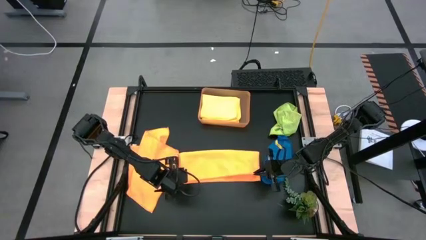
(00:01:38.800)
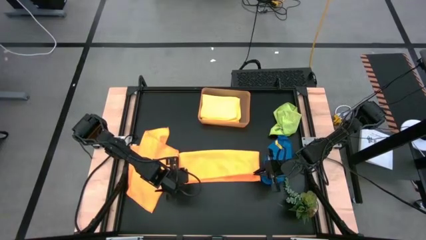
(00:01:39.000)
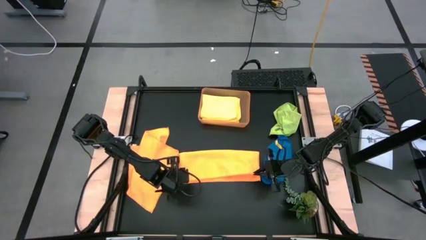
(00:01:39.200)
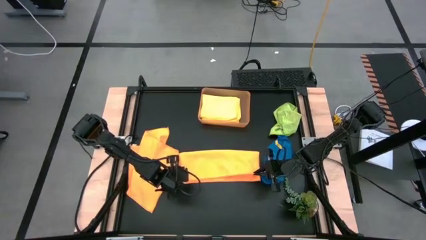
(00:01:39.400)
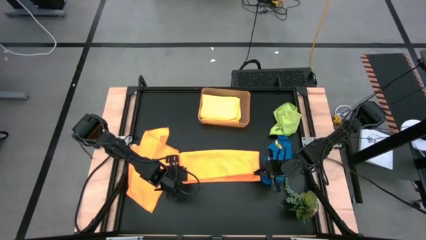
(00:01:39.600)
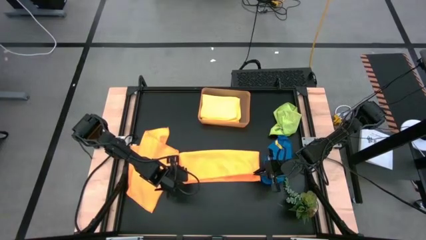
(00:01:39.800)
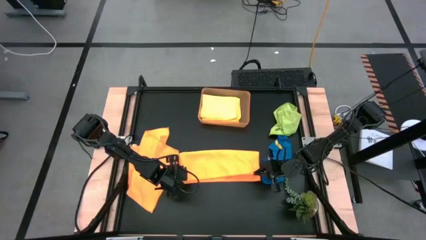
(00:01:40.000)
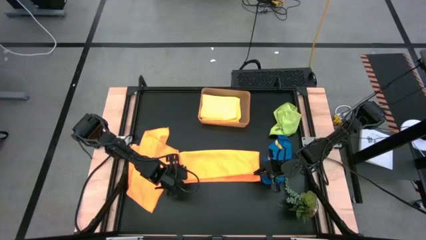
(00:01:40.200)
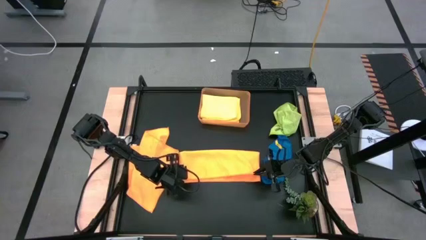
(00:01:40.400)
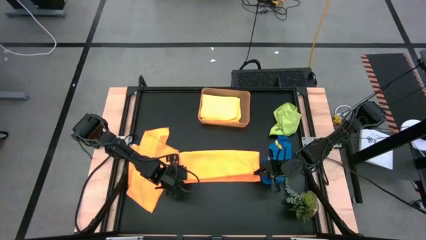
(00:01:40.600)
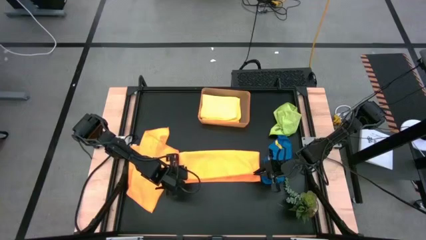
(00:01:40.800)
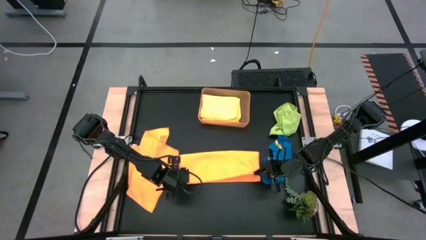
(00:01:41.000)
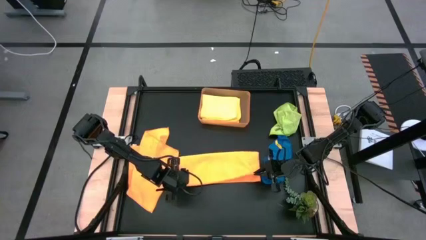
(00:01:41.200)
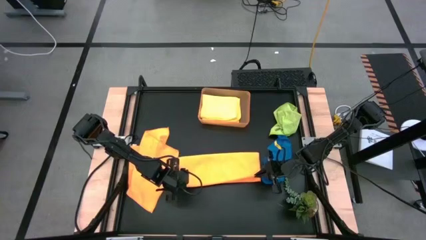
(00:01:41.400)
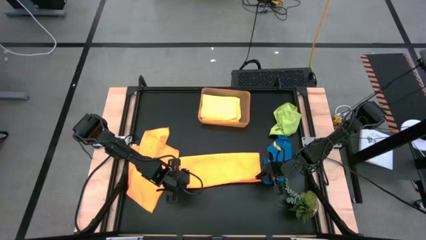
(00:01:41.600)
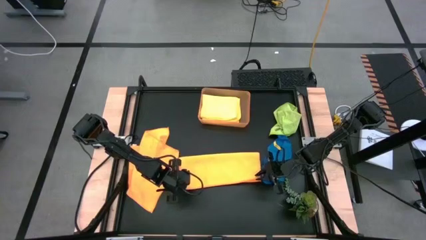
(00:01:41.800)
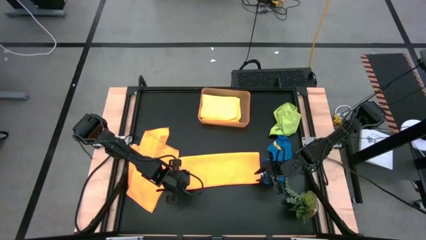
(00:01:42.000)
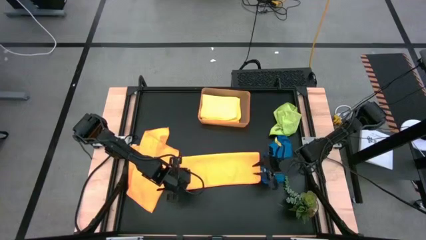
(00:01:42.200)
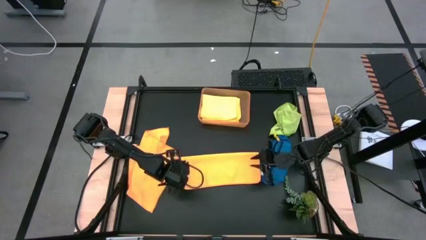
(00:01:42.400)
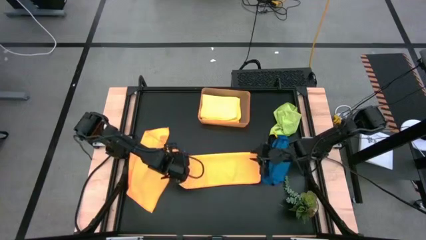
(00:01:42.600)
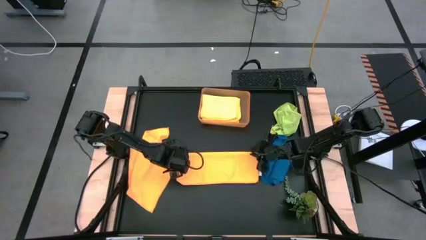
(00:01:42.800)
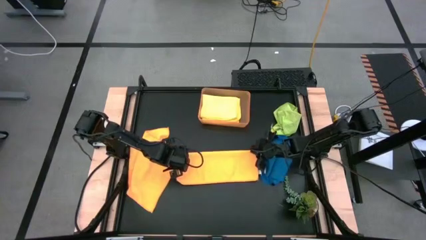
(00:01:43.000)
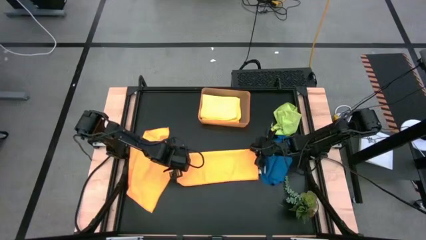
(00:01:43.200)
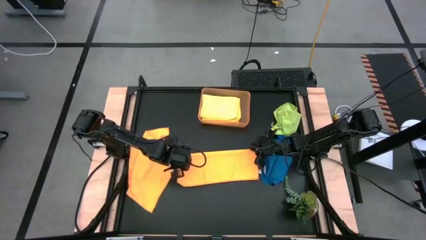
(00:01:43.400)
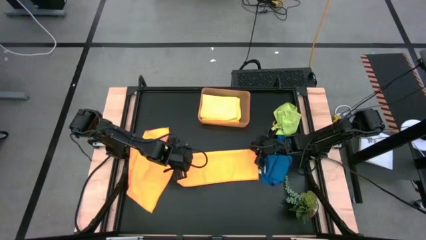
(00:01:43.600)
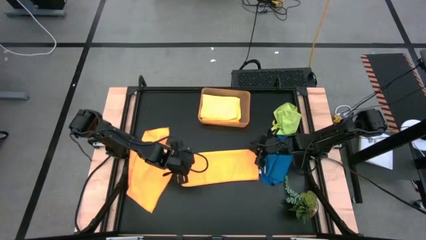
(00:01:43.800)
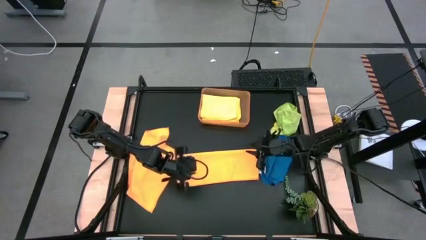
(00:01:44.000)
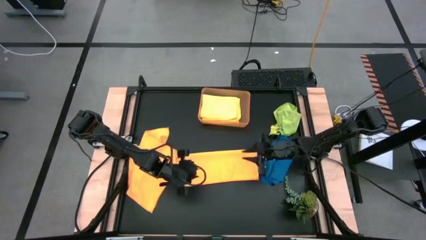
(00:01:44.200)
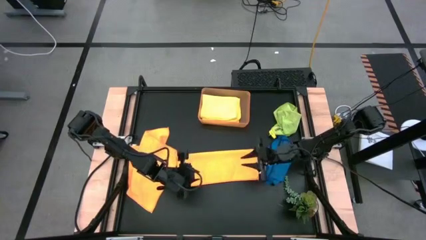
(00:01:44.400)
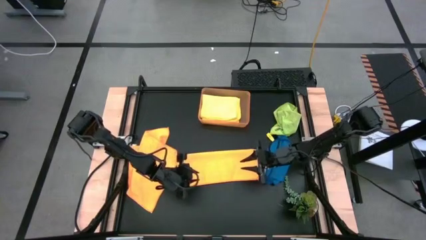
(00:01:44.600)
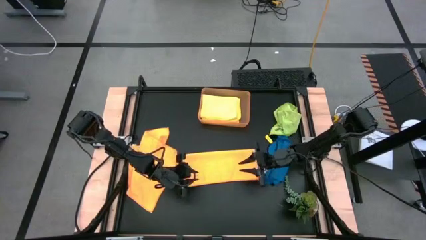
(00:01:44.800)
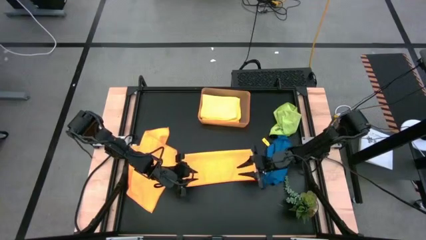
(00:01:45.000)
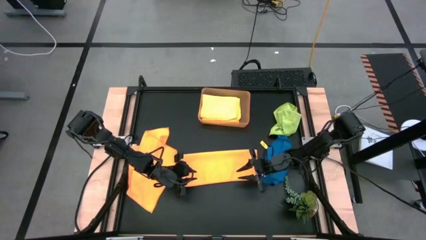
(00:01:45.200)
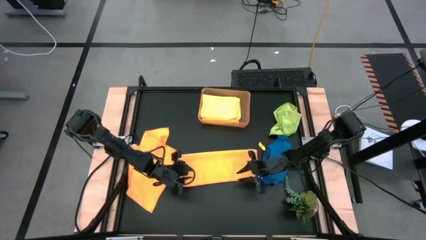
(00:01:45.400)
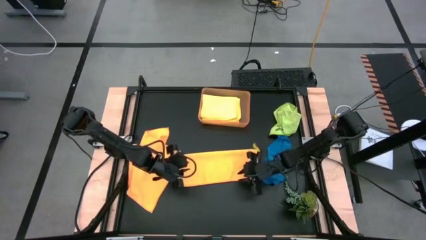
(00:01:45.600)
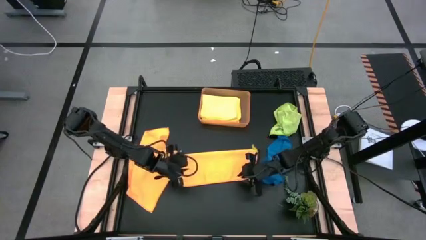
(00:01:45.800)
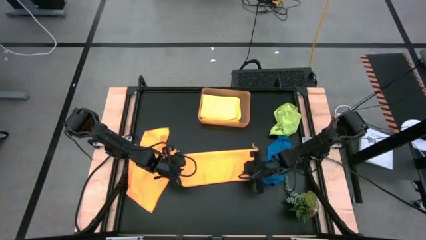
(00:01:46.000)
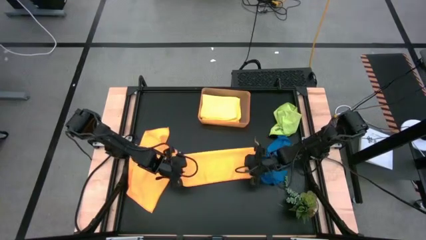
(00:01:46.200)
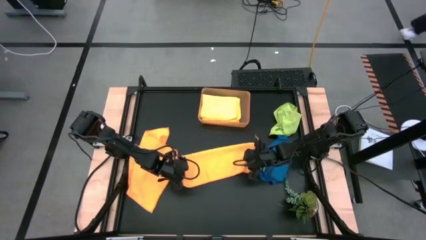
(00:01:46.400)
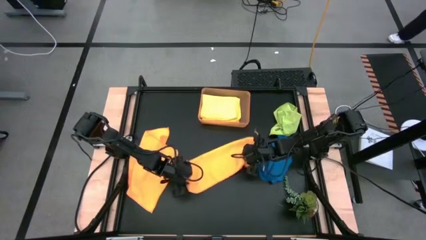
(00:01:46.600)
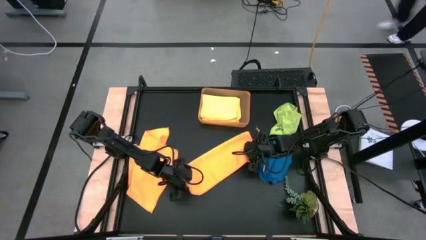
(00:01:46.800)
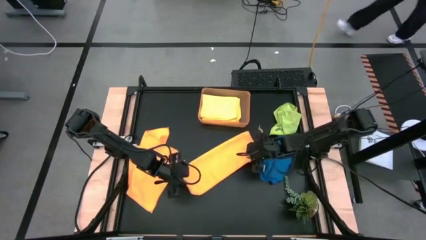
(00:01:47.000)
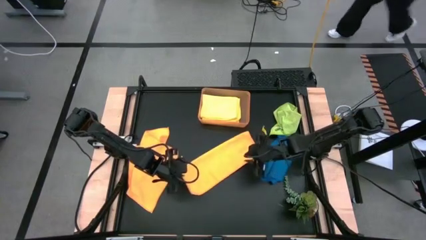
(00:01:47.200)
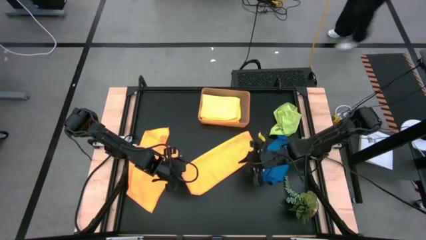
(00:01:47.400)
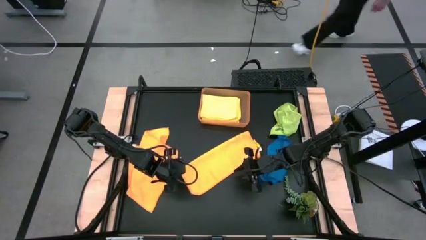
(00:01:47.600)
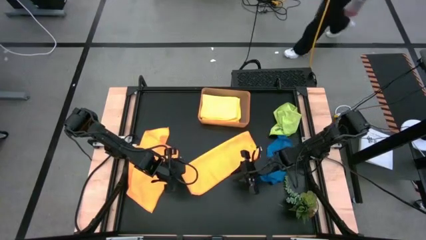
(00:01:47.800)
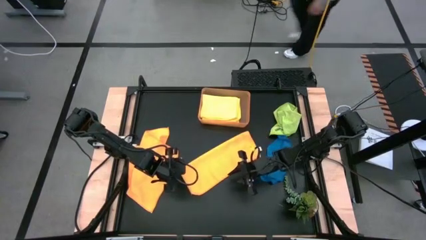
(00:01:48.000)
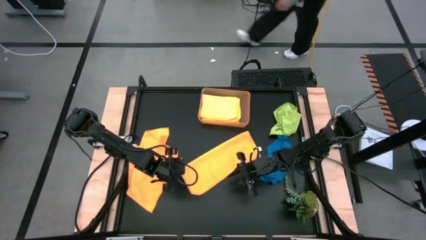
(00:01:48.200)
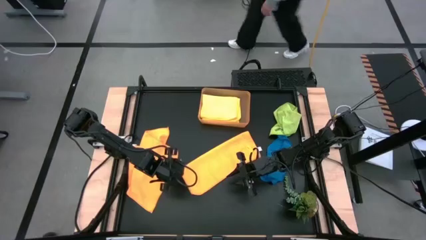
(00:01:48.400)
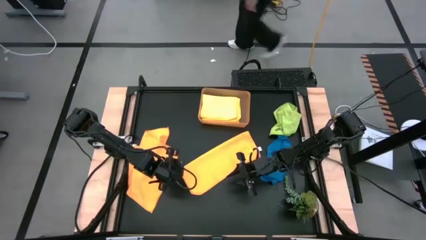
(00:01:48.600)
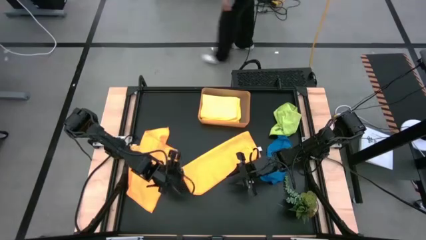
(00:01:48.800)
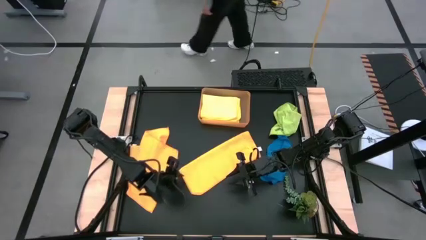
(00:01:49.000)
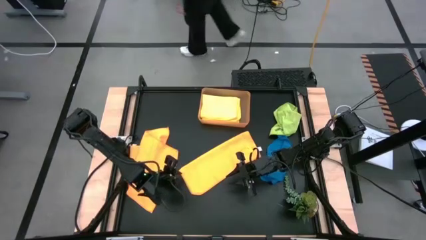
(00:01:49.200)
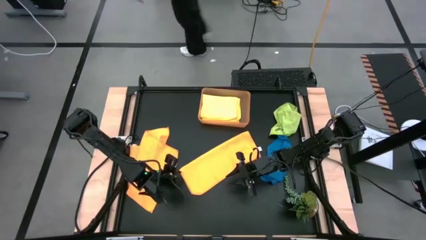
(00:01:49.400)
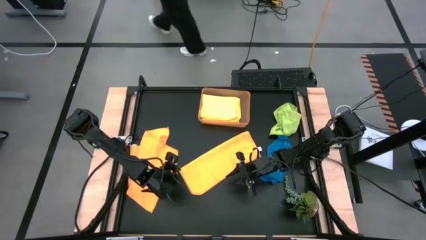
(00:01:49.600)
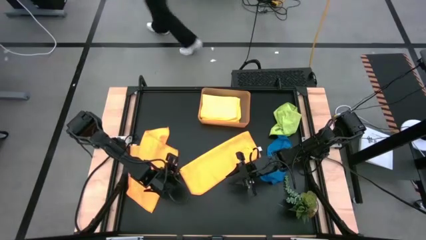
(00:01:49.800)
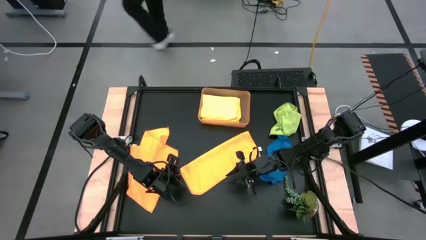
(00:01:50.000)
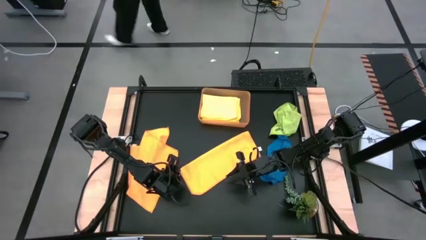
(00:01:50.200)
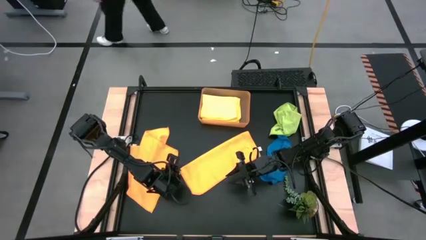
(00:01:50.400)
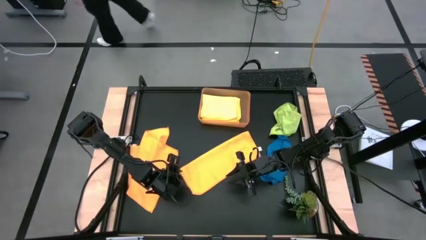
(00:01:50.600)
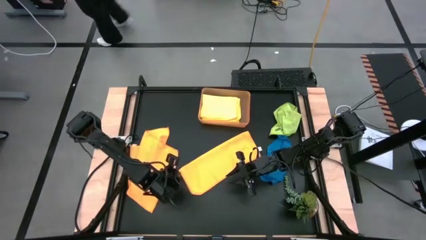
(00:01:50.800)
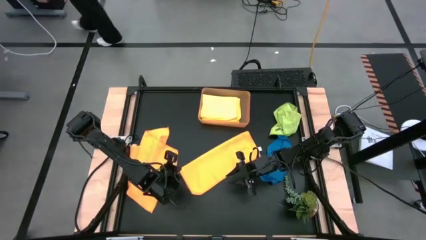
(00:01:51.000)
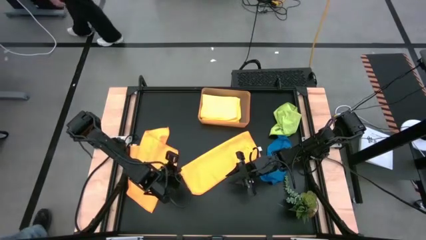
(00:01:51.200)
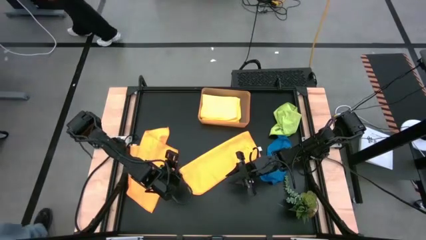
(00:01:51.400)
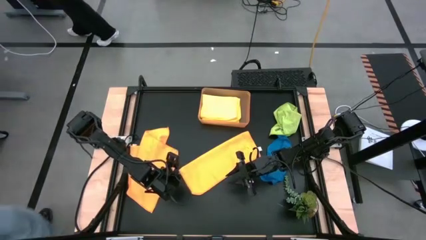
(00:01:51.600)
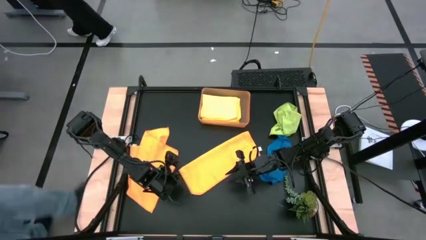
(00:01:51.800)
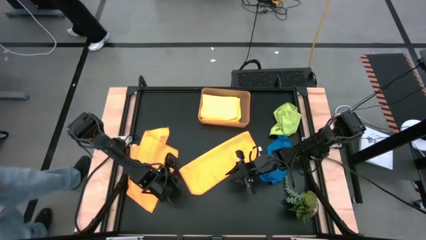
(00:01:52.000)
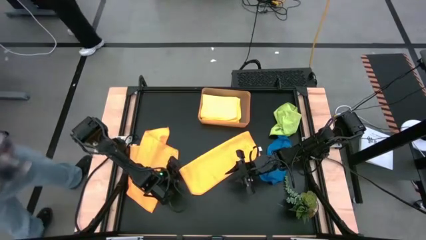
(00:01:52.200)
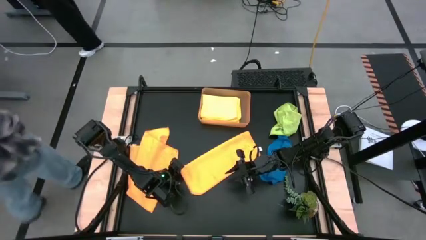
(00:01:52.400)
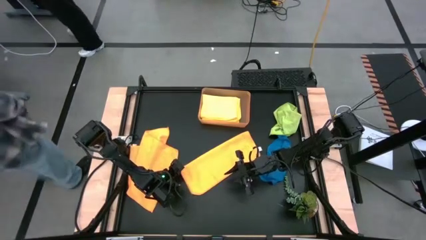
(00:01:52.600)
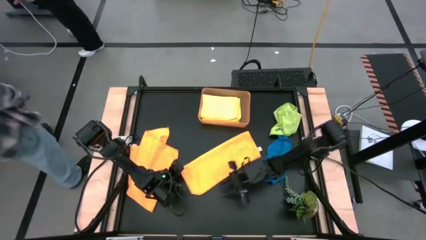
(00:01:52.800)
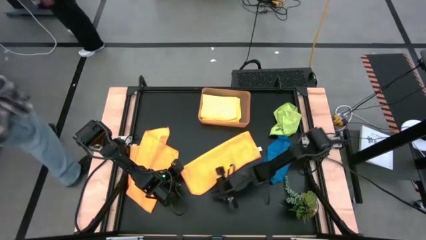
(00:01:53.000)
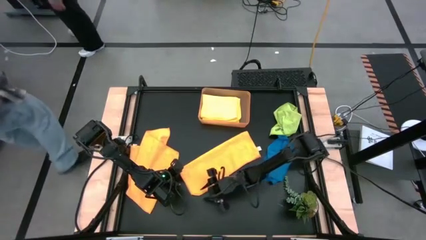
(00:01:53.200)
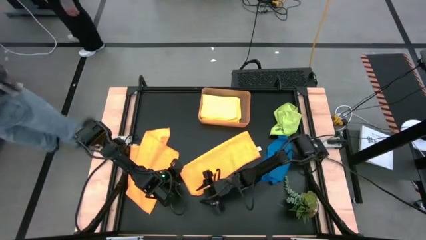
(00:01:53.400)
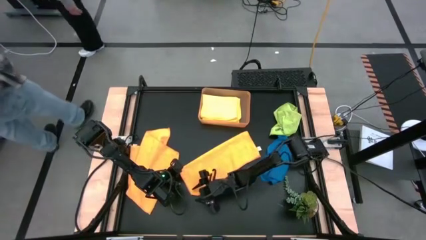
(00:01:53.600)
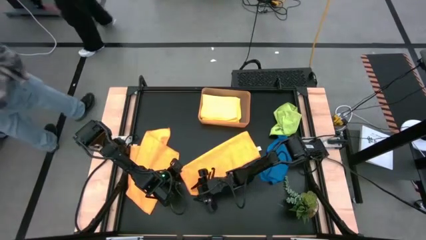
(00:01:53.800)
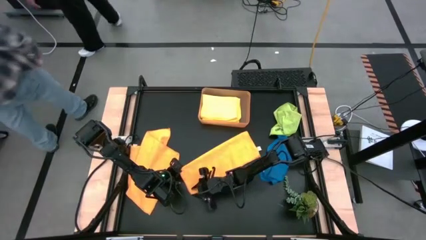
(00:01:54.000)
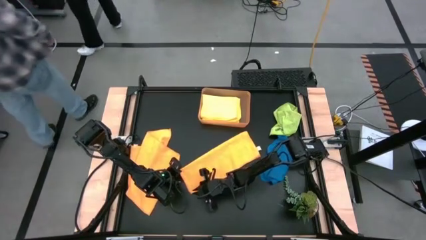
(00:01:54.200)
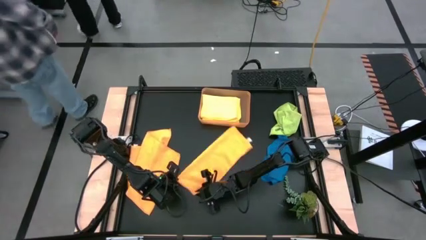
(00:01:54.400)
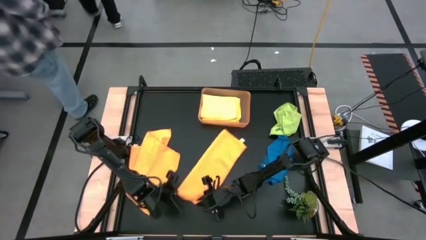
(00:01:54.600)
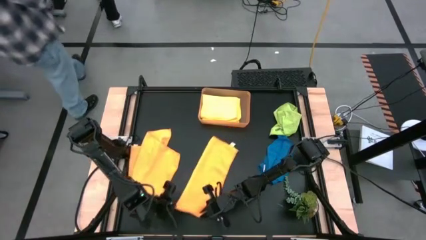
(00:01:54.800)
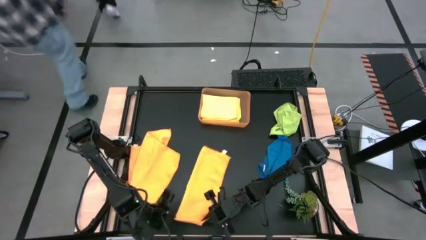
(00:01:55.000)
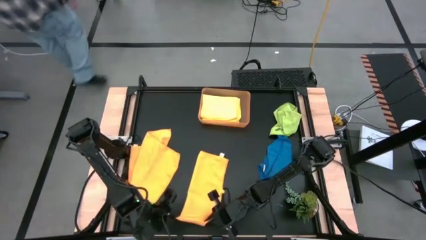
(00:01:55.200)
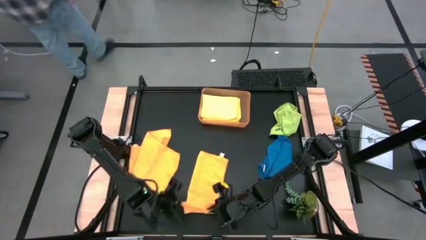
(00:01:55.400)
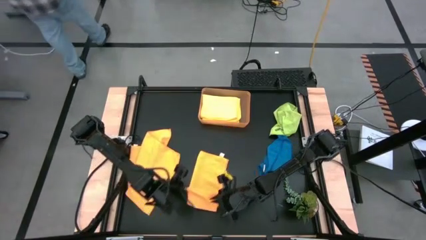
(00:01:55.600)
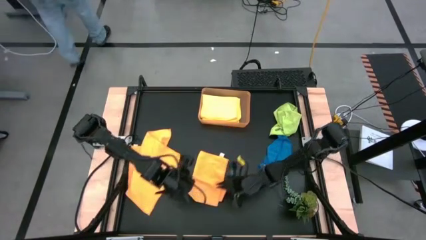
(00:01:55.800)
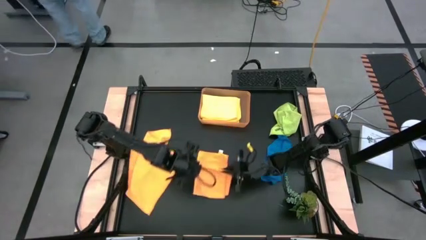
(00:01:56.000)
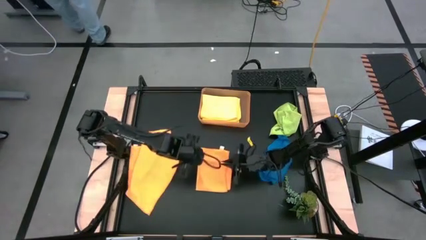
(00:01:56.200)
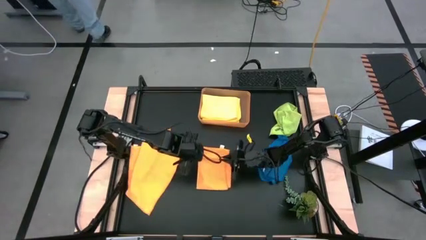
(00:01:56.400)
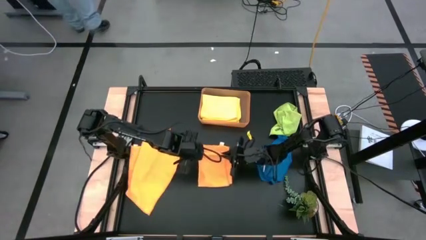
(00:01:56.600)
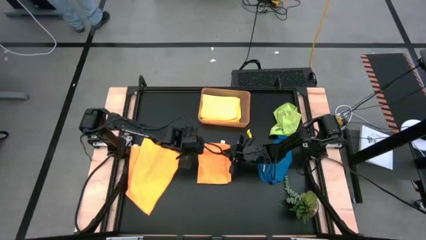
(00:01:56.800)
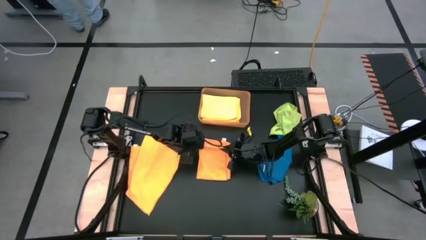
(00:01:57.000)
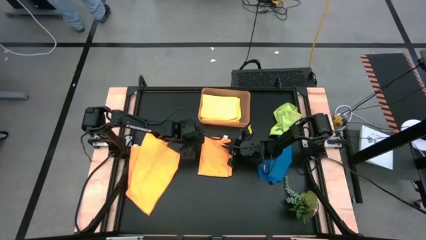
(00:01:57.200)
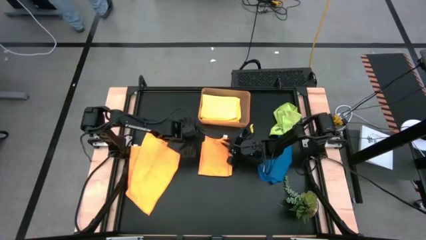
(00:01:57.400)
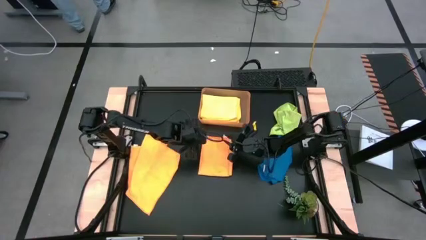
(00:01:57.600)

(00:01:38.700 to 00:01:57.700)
Task: Fold microfiber towels
Fold the right orange towel
